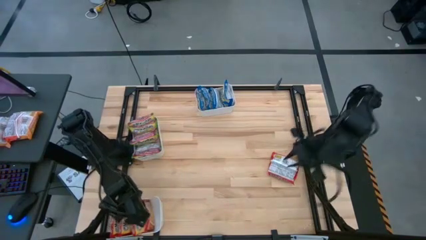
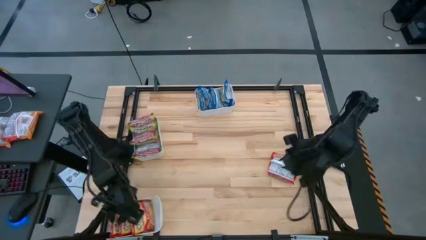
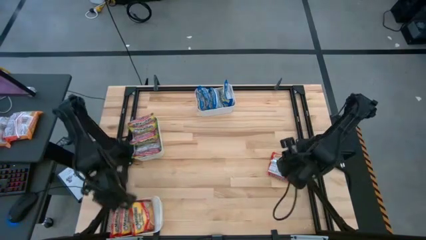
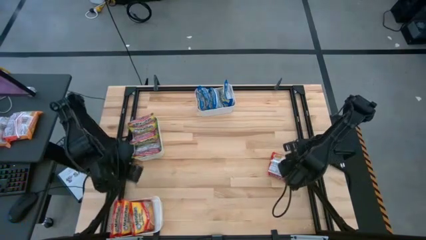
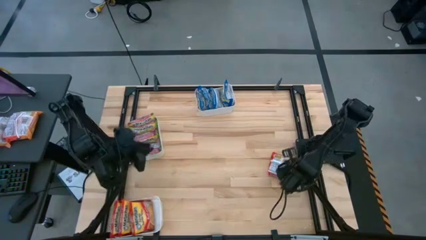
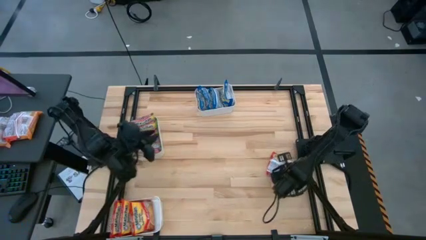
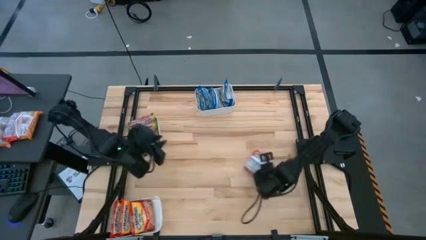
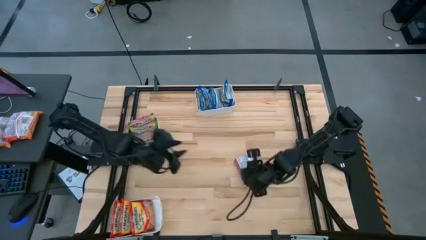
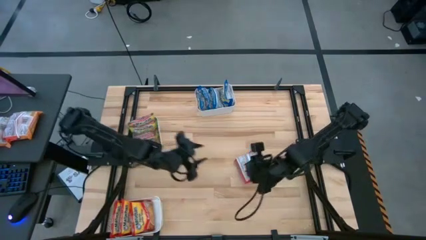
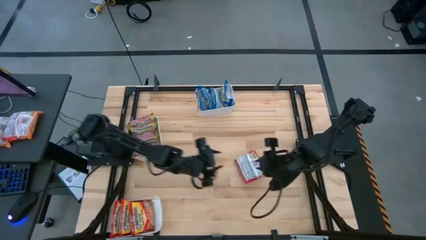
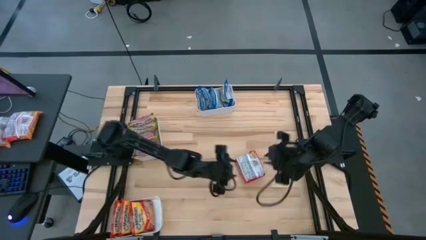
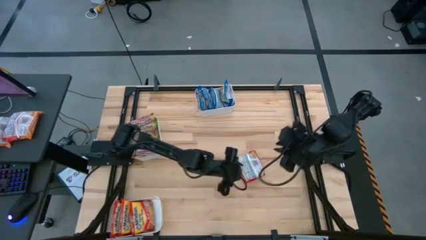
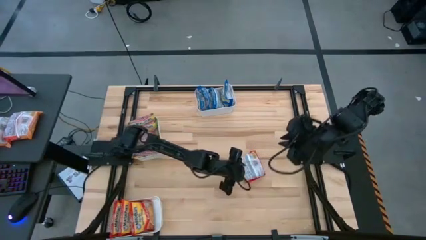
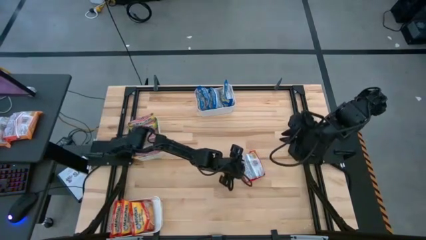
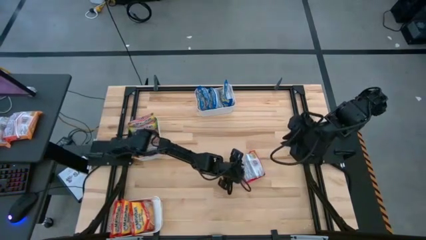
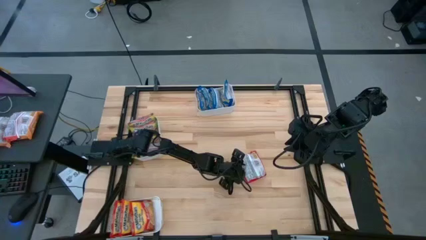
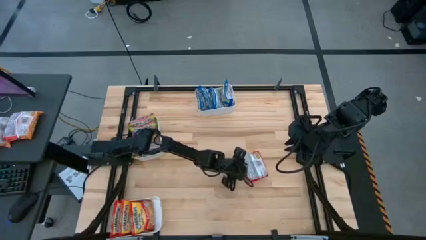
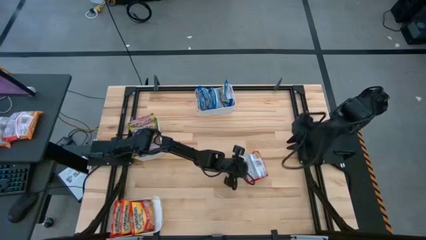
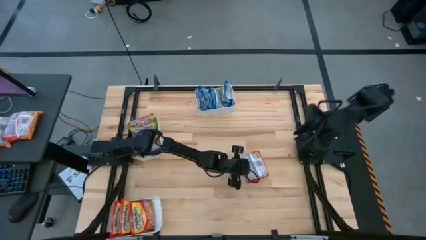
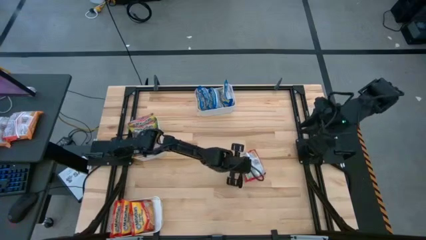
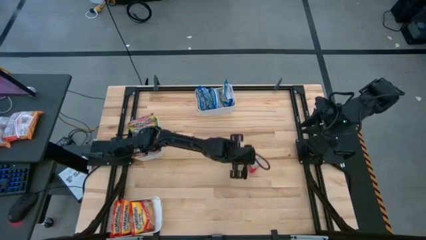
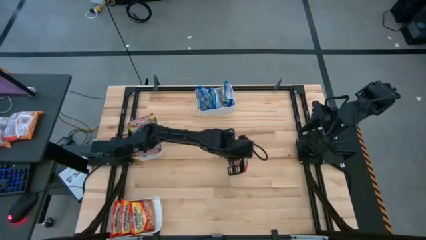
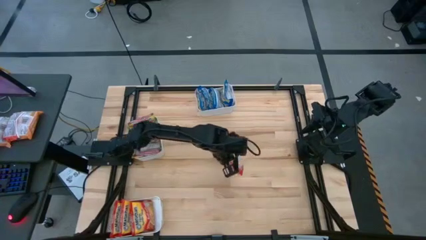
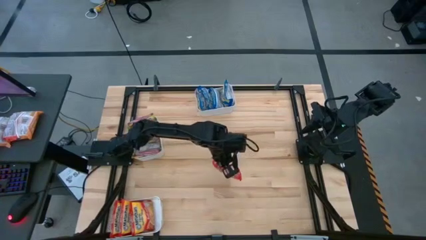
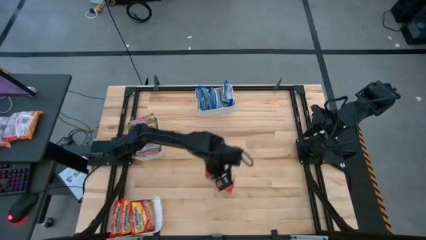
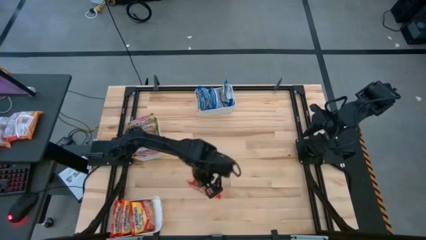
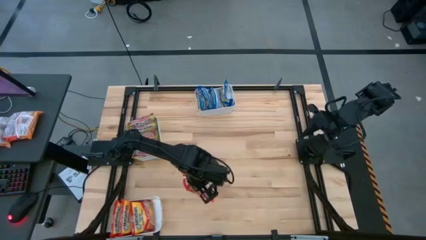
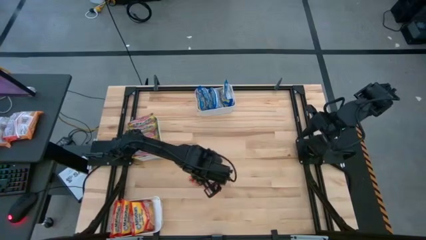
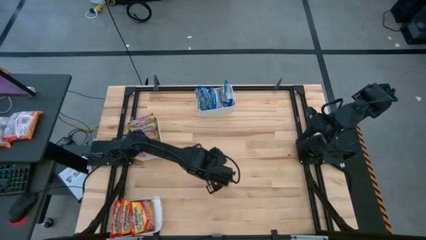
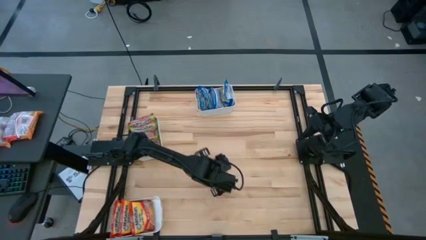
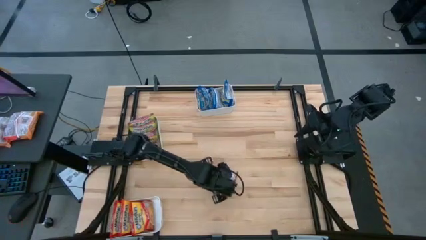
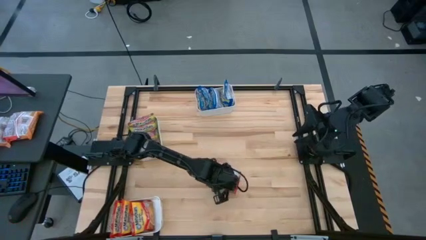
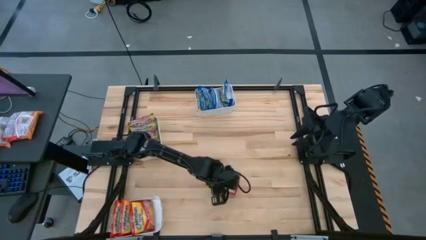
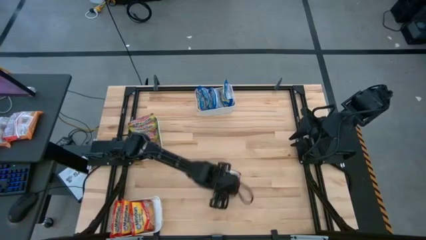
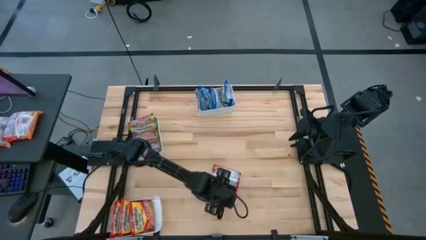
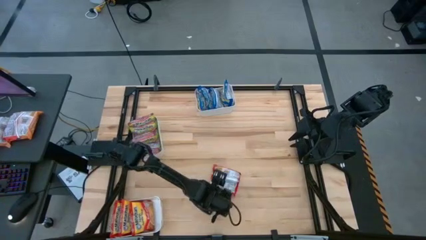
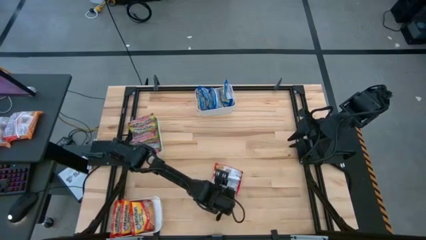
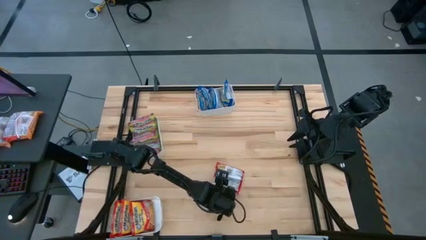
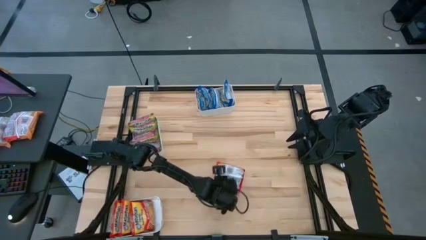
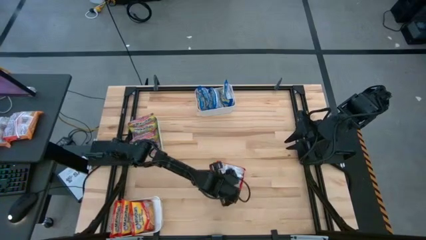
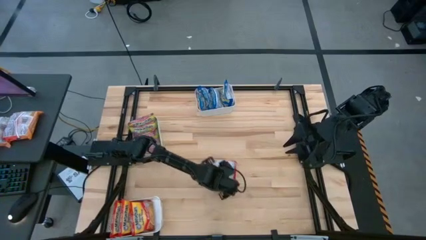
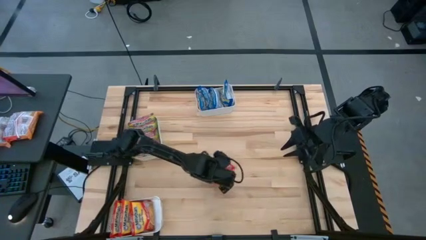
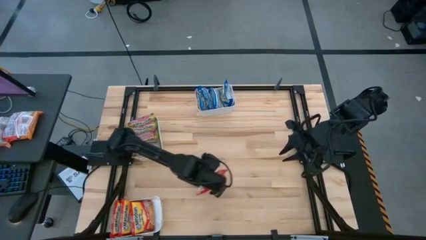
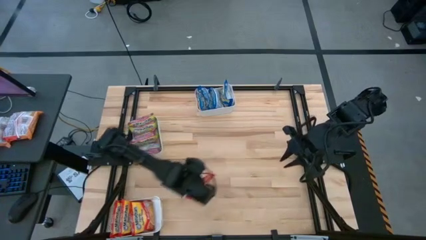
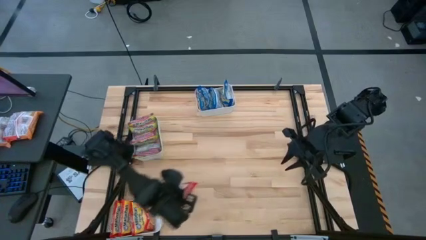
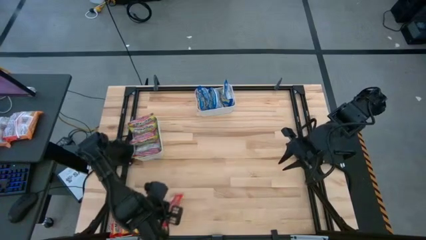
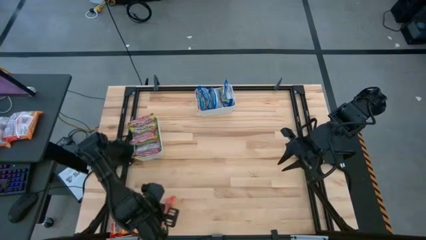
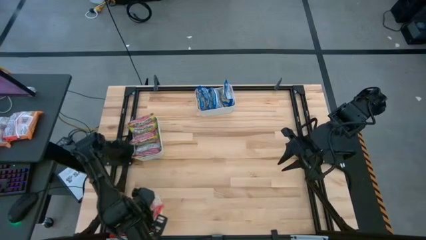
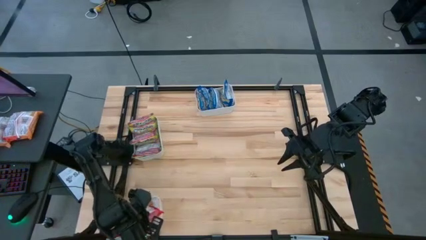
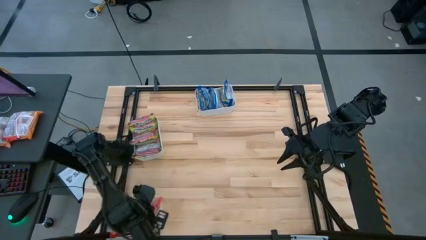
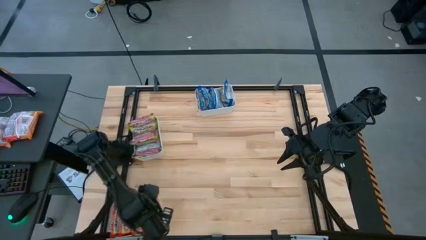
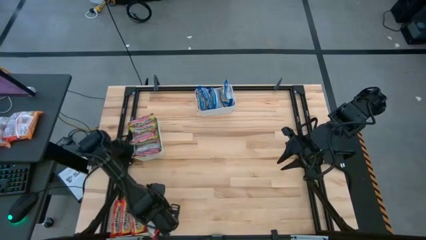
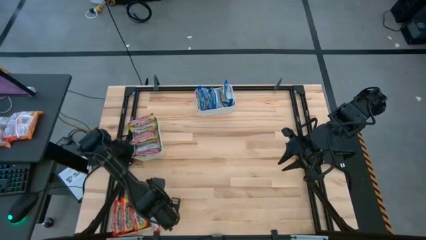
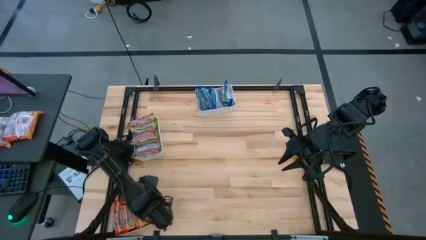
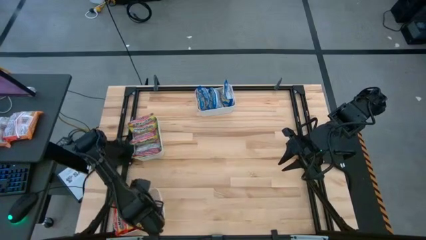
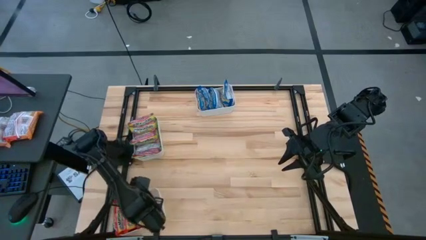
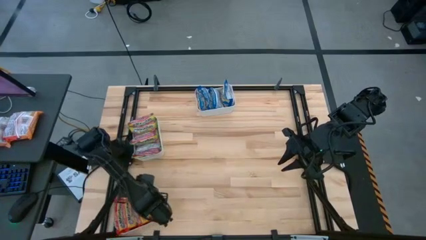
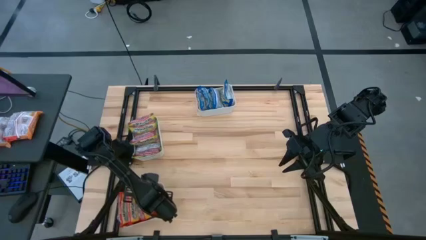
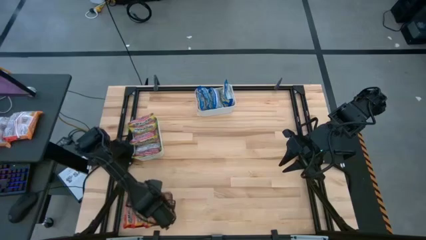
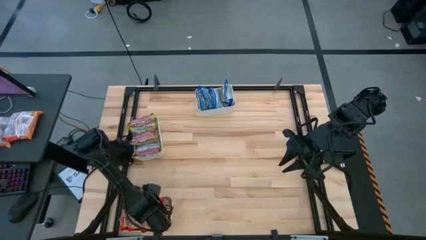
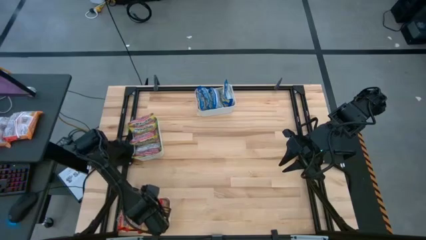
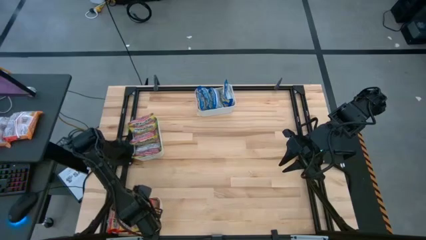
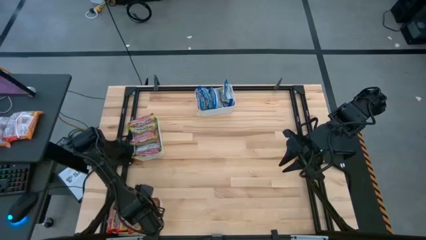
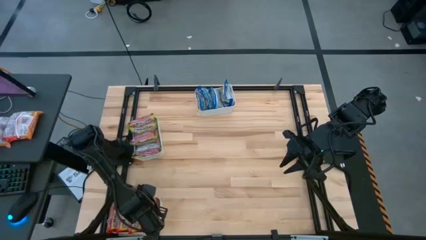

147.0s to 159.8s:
Task: Sort Maruchan noodles
Put the red noodle pack into the bottom white bin

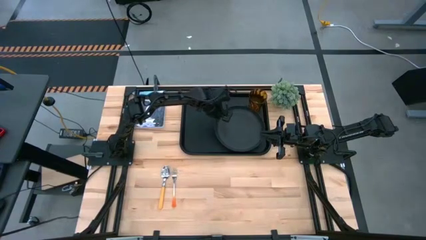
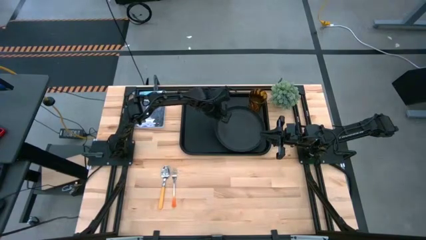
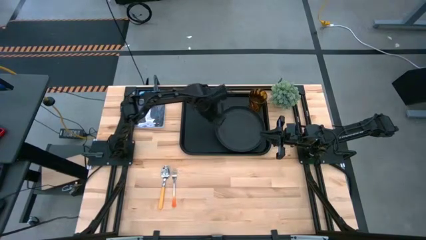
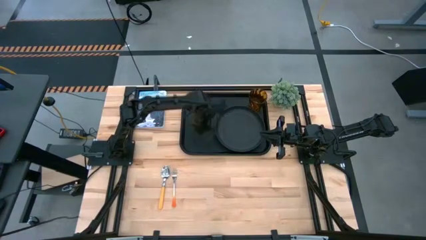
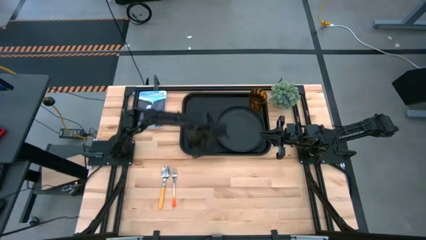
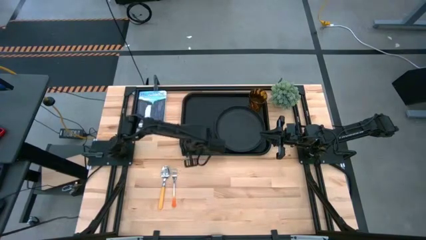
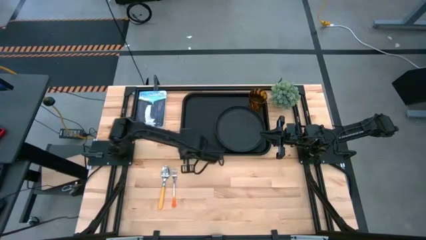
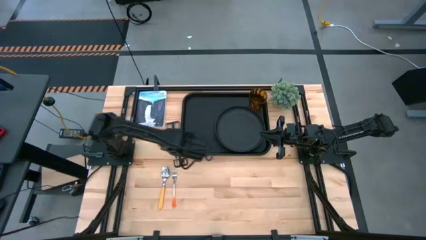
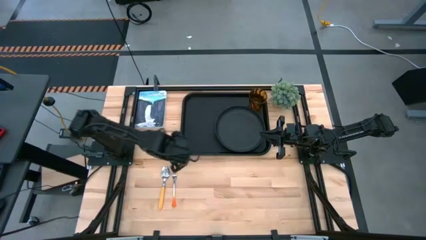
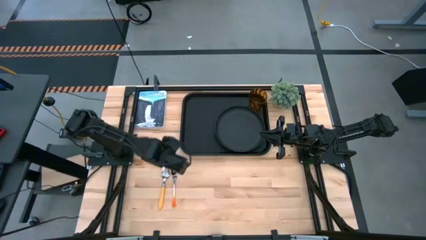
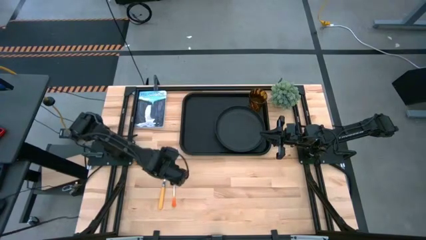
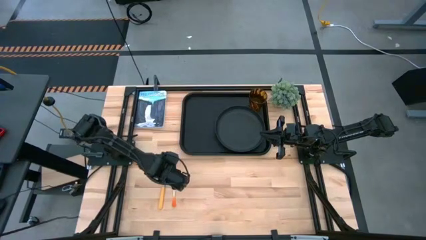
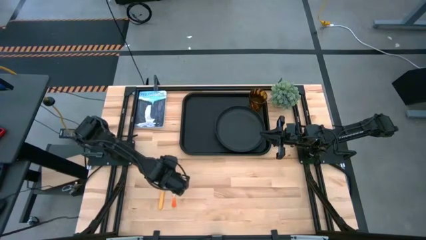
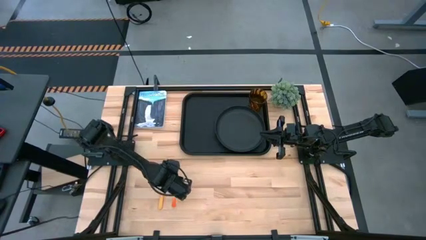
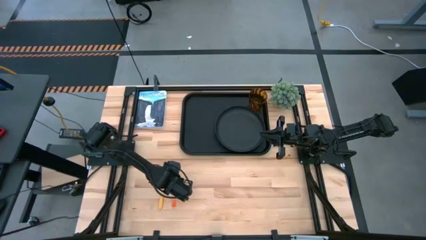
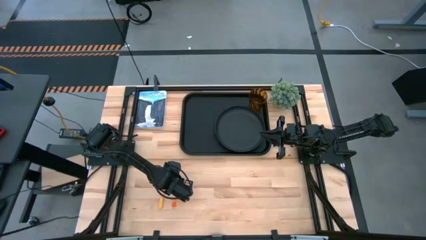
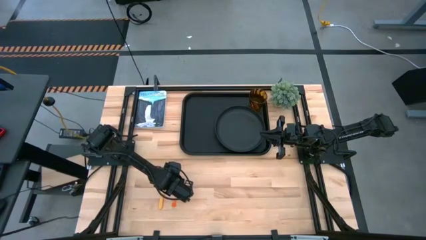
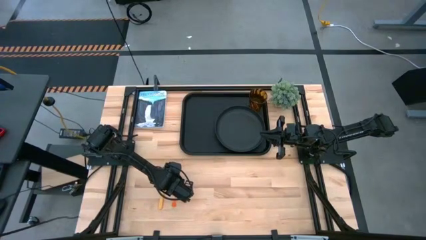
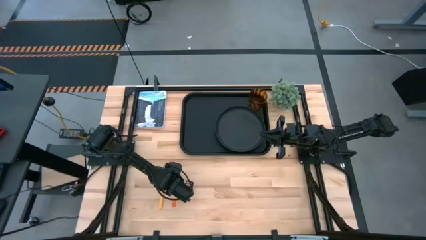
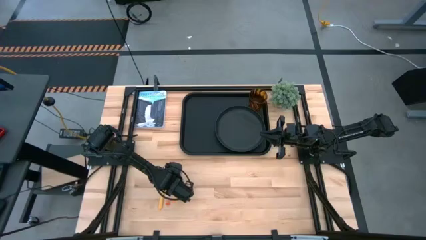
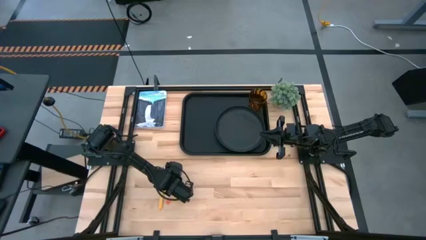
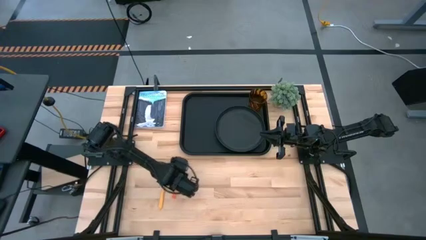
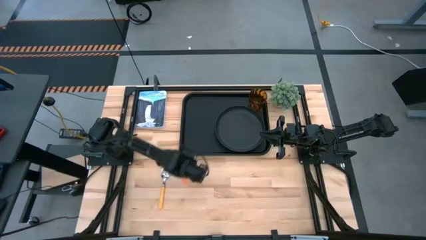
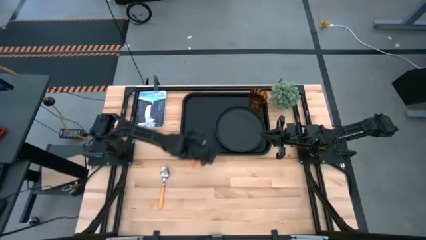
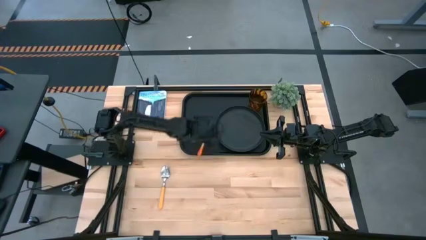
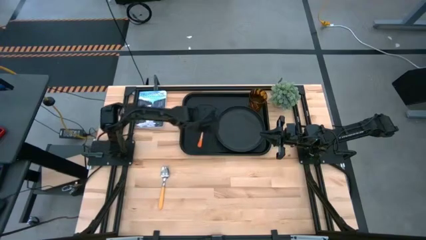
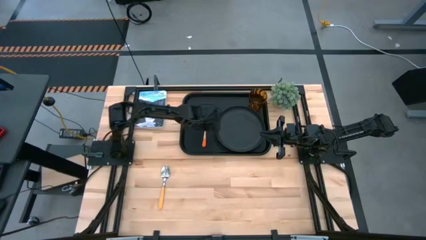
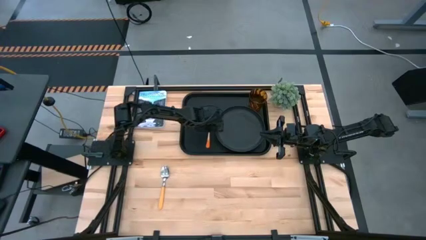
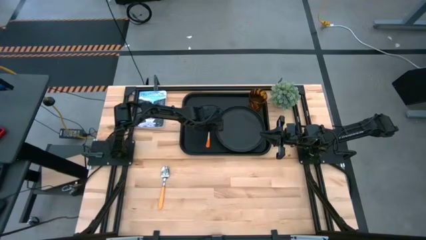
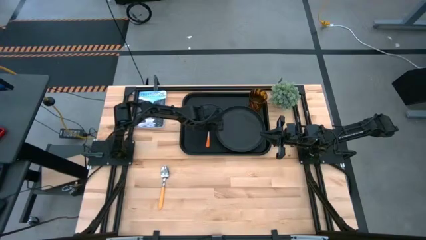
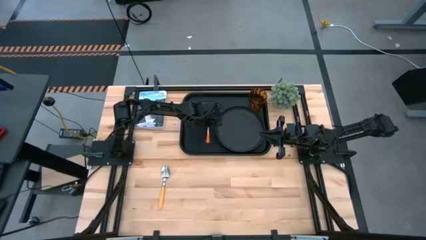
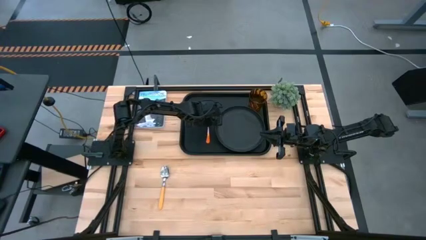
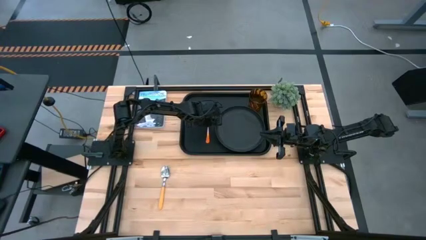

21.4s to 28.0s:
Task: Pick and place plate/cup/fork/spoon on tray
Put the orange fork on the black serving tray to the left of the black plate
